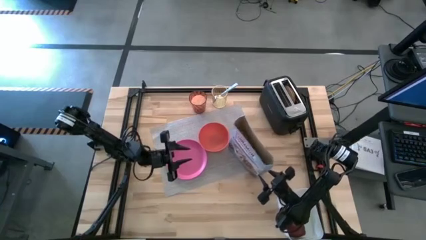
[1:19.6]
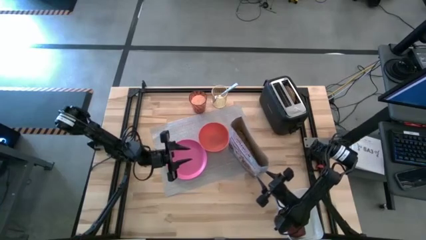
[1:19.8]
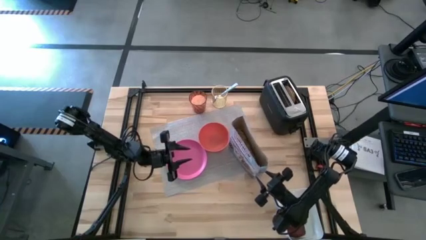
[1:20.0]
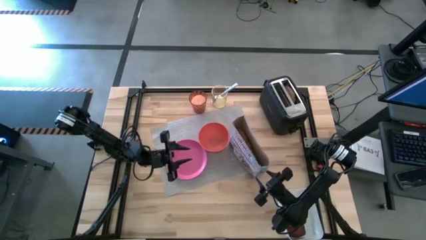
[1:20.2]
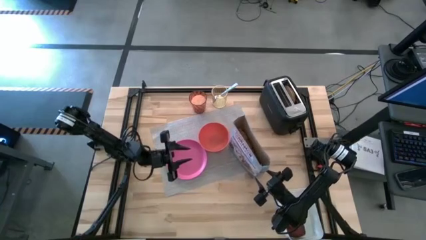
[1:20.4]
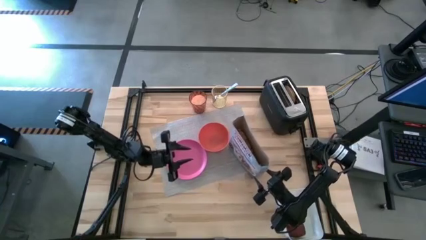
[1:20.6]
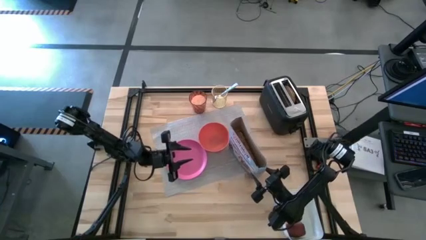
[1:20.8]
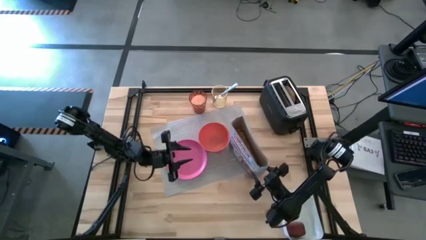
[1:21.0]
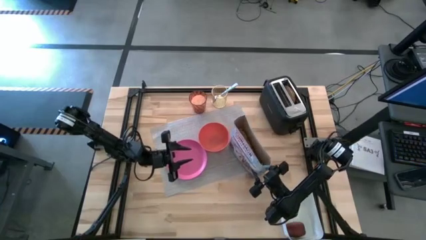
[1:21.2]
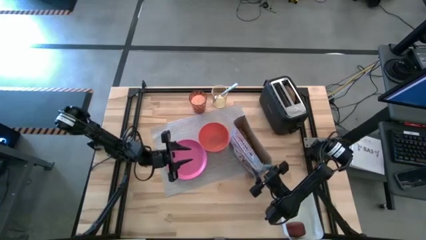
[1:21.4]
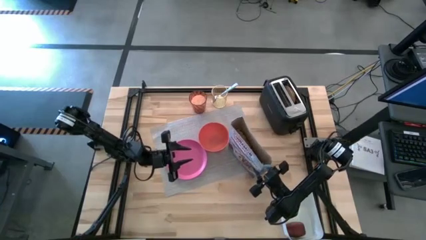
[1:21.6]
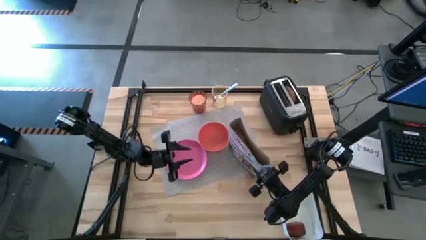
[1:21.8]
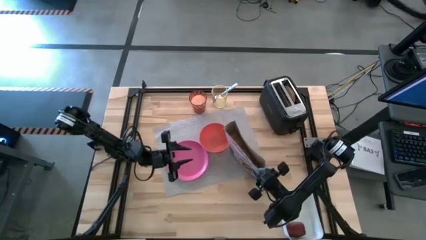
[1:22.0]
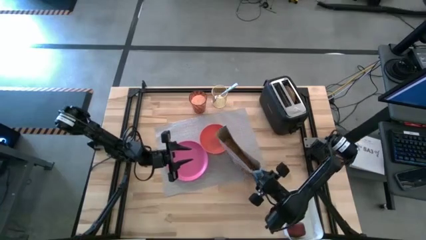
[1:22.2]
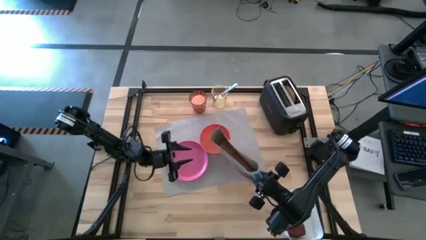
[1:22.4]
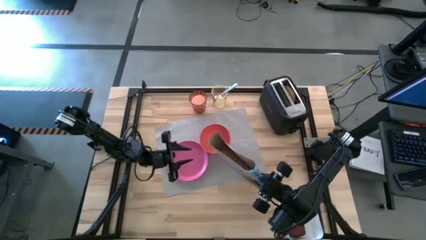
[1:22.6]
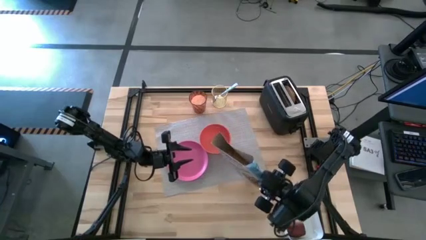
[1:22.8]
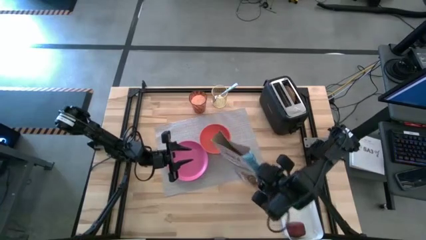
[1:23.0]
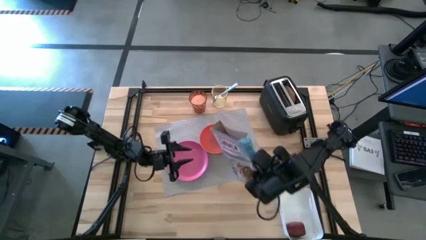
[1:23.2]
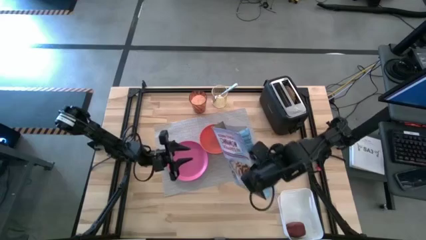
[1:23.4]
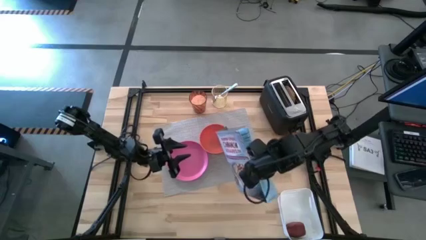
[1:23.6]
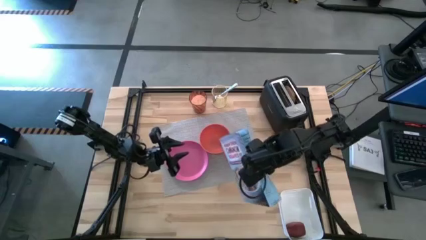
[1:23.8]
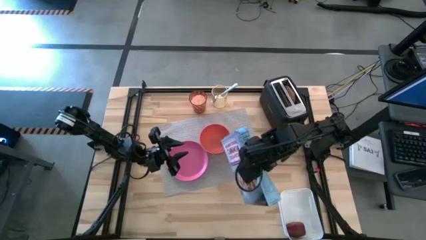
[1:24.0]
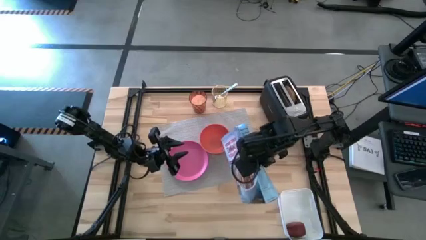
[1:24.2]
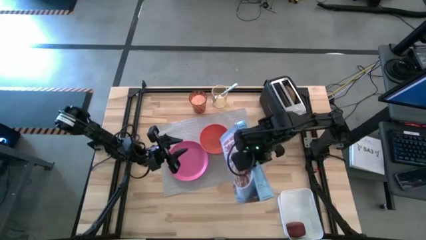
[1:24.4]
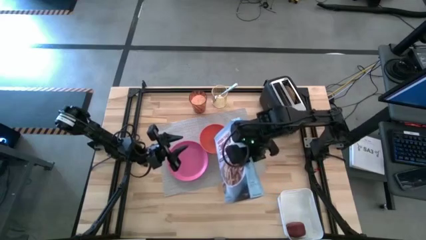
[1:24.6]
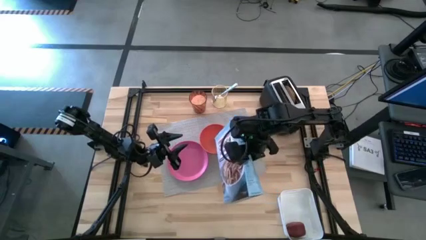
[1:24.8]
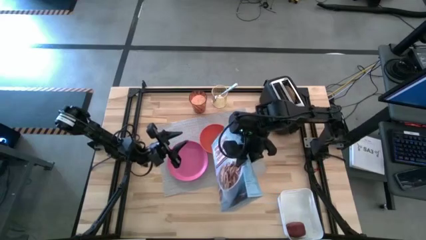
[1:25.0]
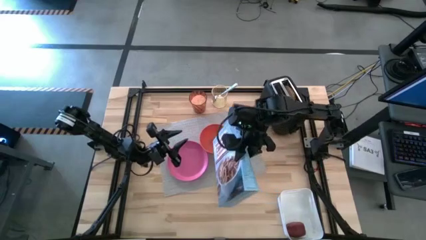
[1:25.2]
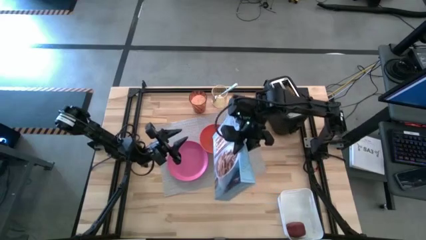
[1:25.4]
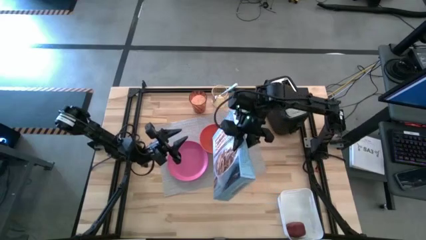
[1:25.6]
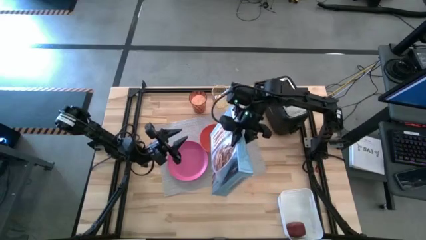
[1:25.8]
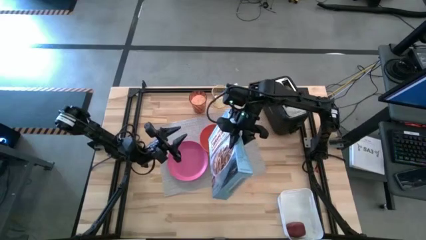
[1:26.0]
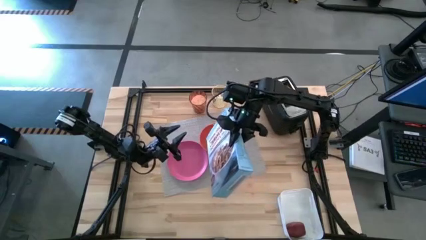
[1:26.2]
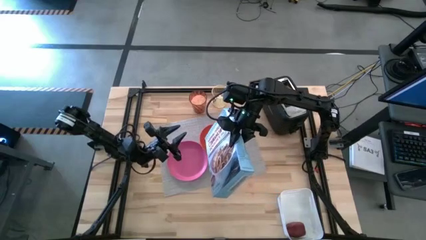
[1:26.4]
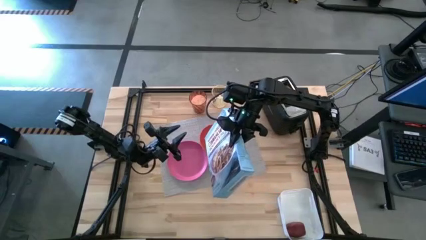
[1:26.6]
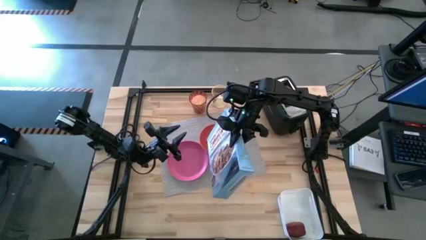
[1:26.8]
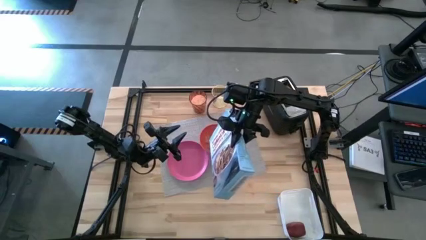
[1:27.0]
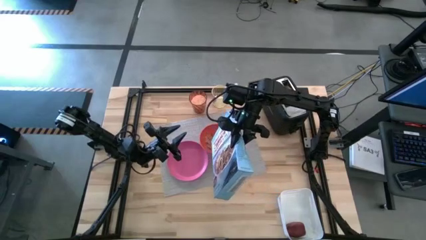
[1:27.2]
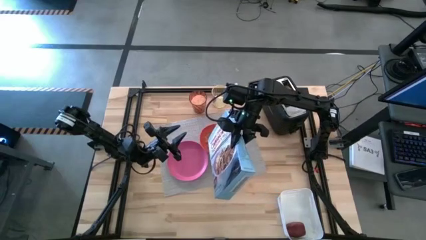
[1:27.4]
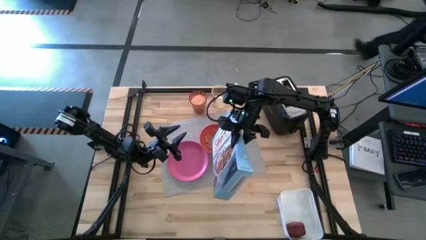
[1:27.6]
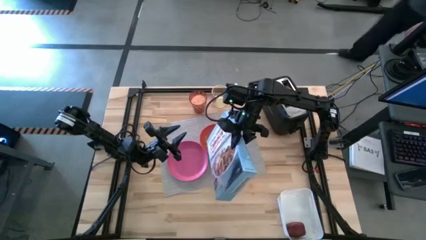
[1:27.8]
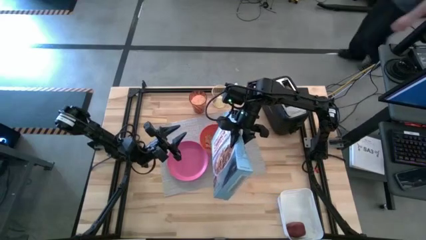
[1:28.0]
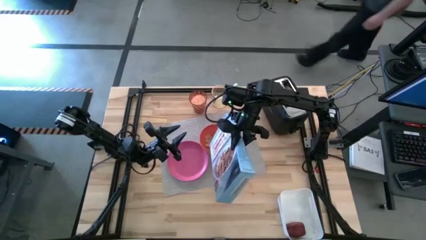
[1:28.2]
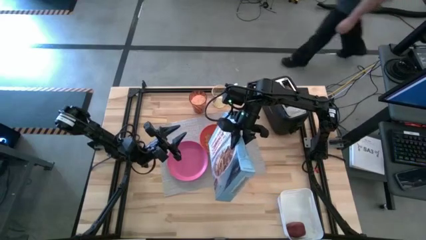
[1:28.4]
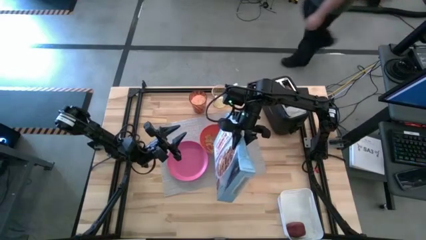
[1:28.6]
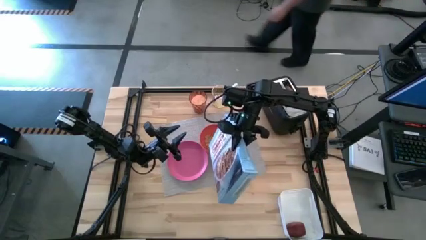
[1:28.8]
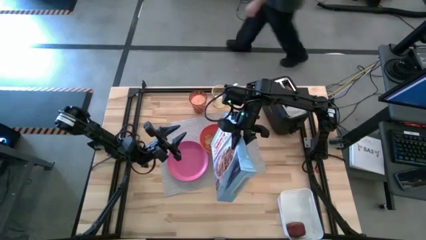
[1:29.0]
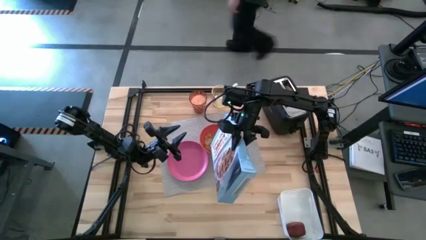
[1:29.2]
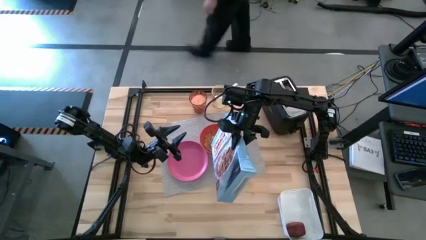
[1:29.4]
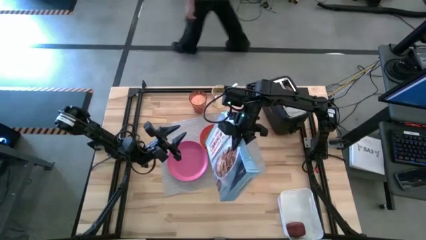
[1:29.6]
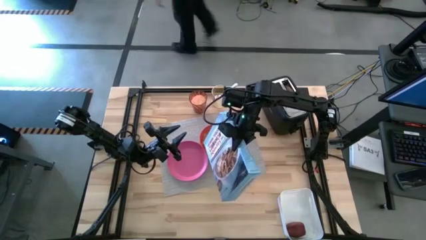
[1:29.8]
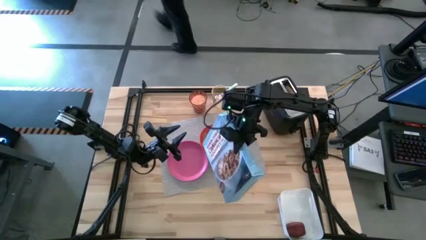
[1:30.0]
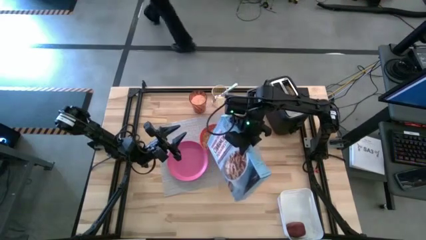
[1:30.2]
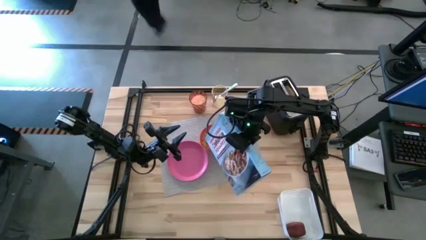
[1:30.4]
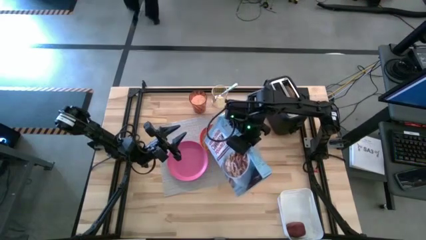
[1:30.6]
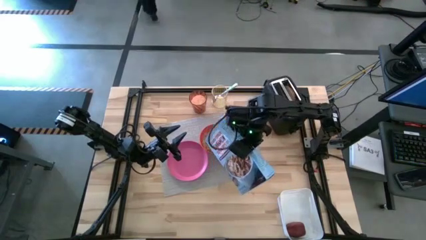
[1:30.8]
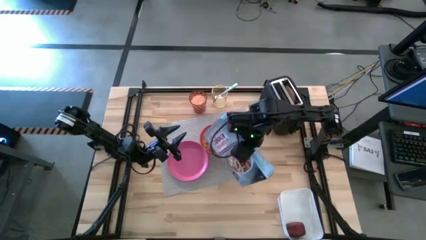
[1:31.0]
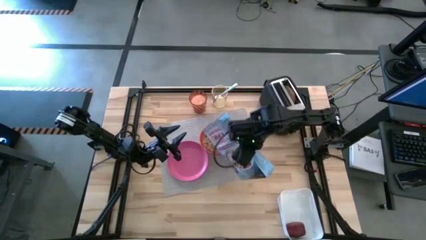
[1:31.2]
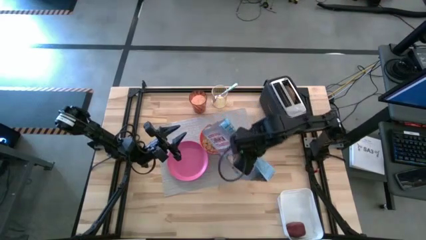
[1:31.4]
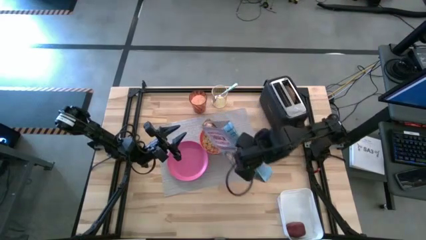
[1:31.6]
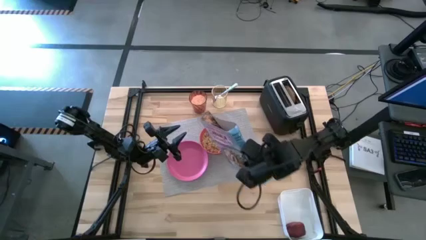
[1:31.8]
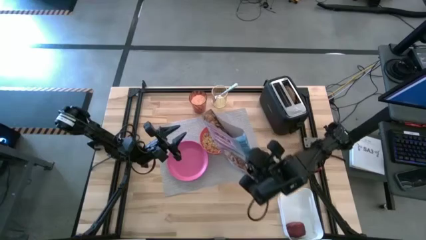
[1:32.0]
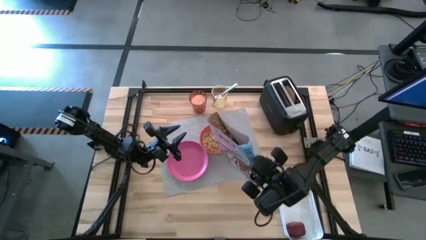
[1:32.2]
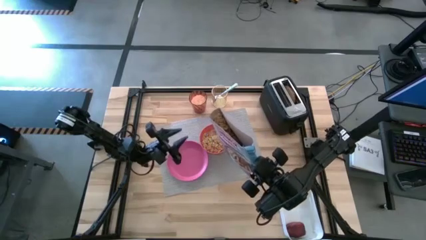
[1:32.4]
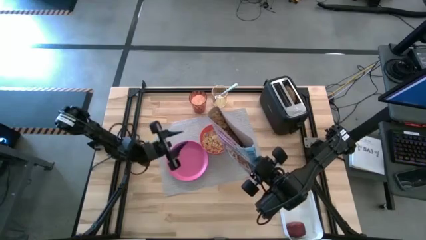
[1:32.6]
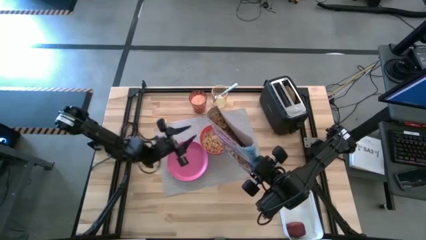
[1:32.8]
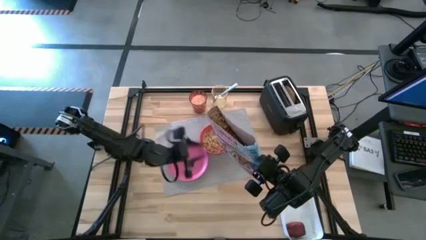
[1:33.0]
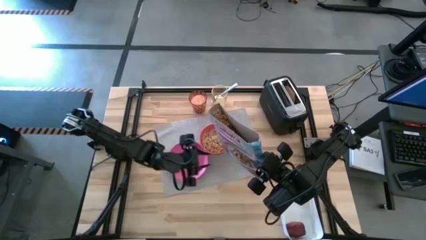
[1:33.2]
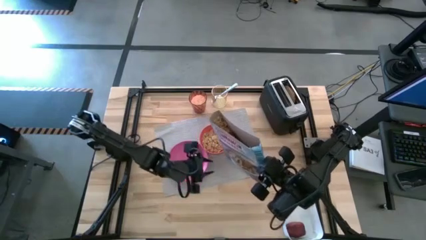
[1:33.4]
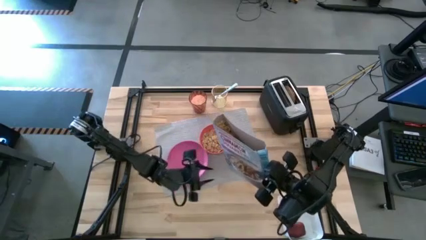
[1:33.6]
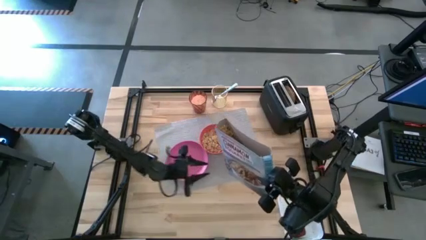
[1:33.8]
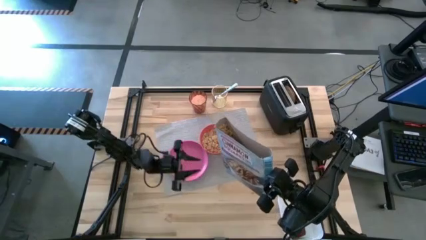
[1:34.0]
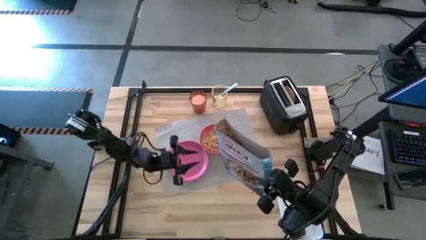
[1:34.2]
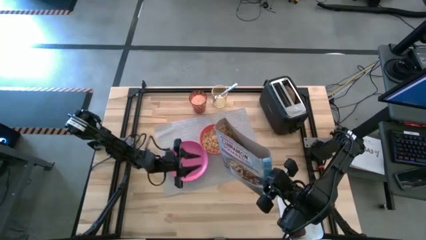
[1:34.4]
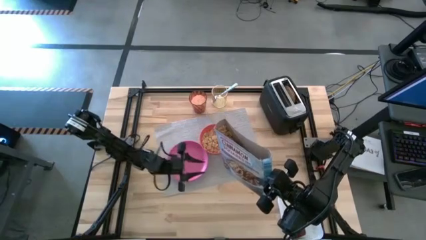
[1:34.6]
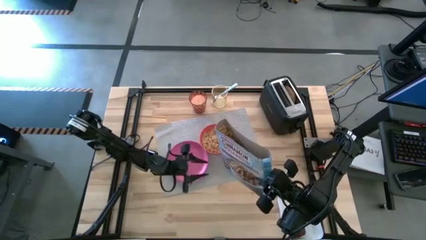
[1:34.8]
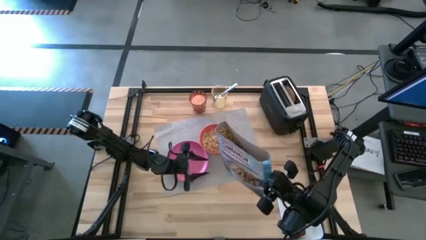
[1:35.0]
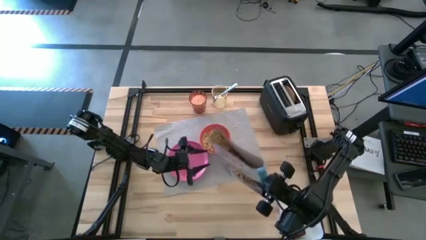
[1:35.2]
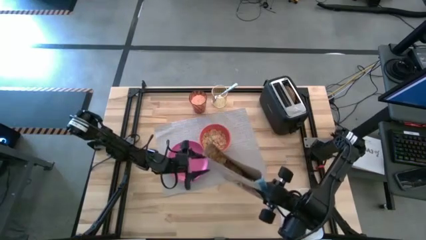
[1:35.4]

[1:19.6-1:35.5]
Task: Arrange a breakfast setting
Pour the cereal from the cereal box into the orange bowl
